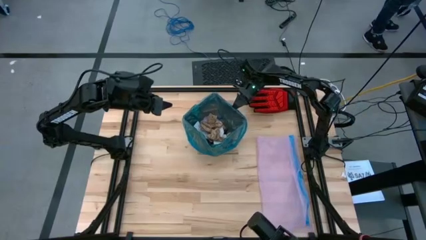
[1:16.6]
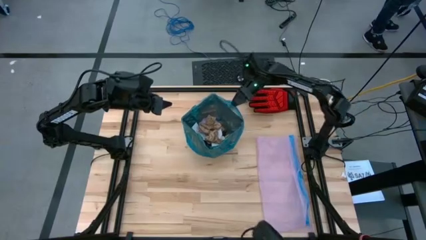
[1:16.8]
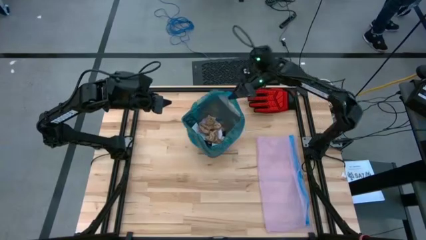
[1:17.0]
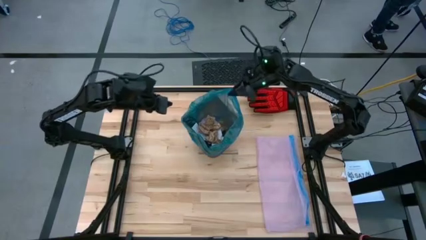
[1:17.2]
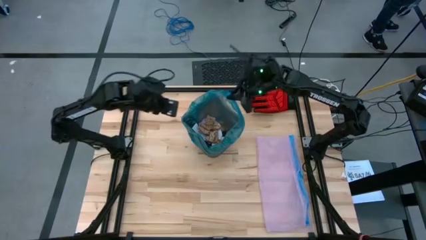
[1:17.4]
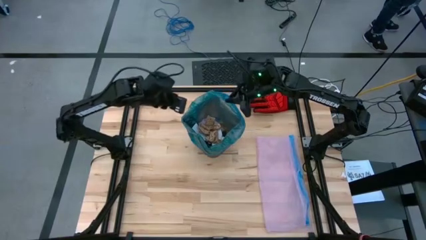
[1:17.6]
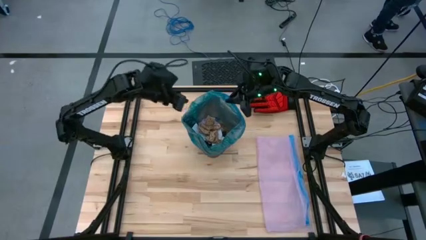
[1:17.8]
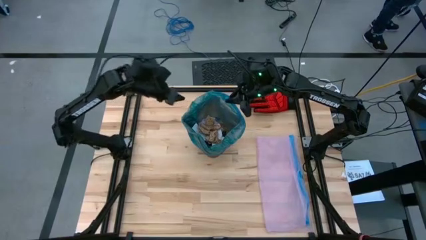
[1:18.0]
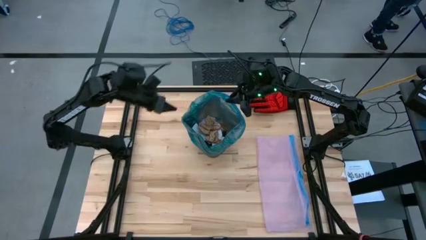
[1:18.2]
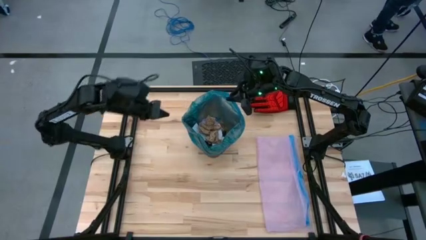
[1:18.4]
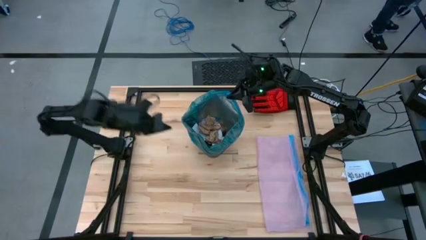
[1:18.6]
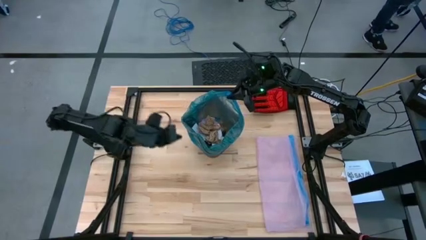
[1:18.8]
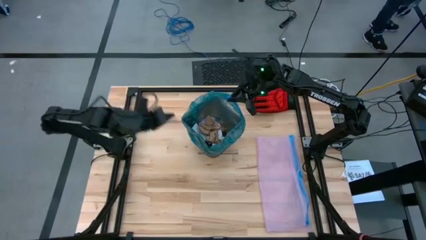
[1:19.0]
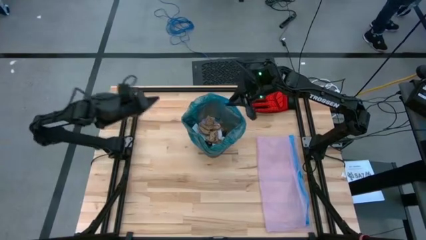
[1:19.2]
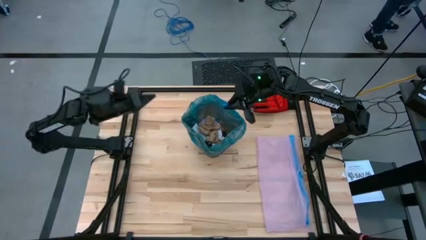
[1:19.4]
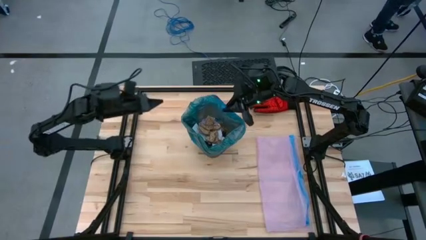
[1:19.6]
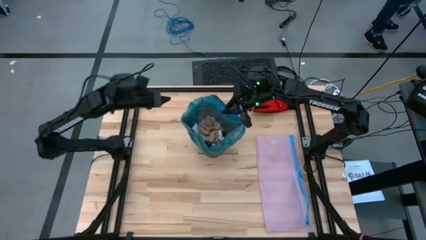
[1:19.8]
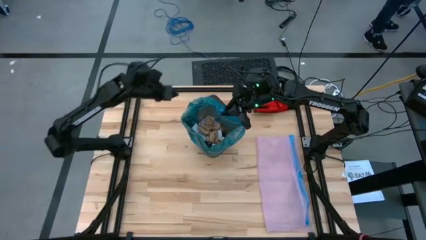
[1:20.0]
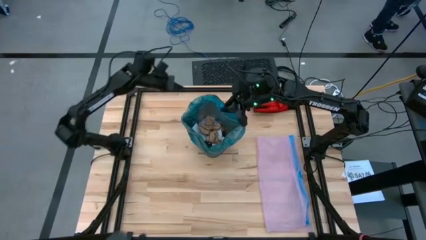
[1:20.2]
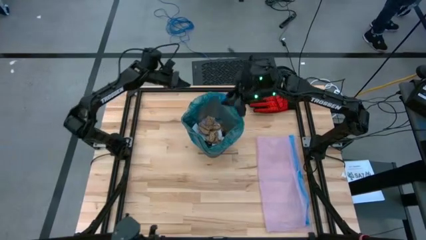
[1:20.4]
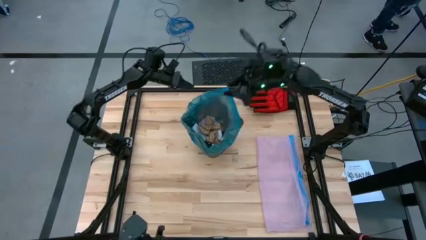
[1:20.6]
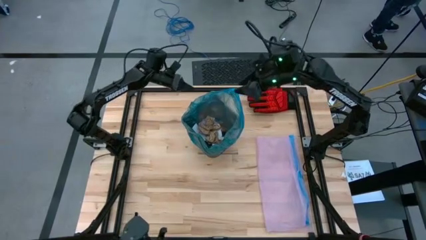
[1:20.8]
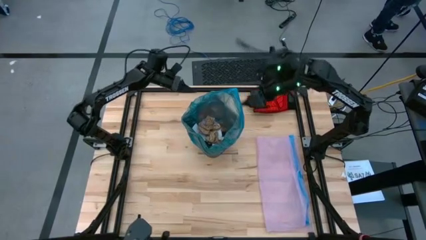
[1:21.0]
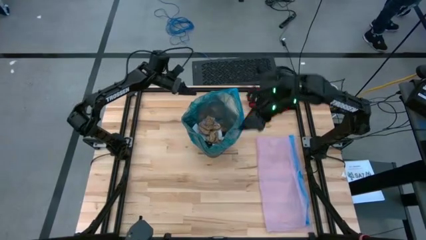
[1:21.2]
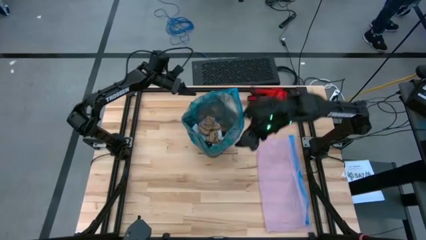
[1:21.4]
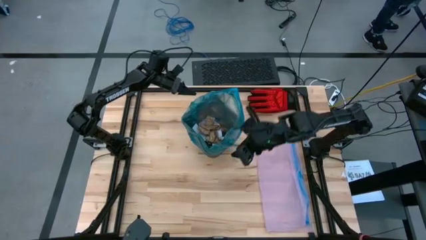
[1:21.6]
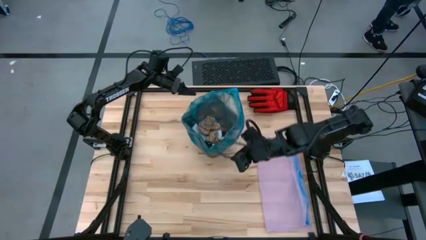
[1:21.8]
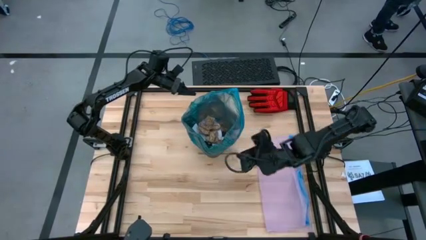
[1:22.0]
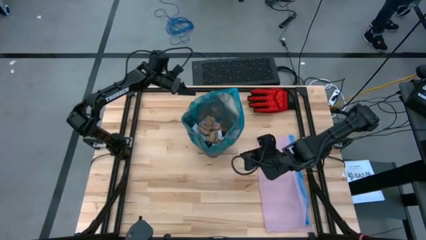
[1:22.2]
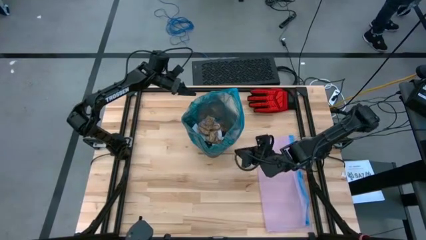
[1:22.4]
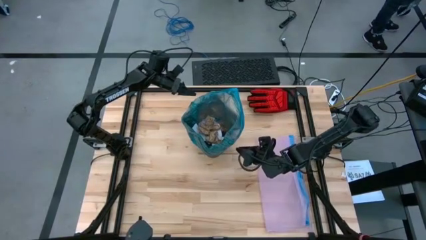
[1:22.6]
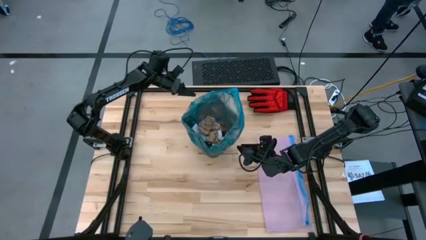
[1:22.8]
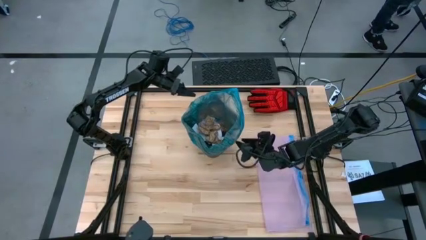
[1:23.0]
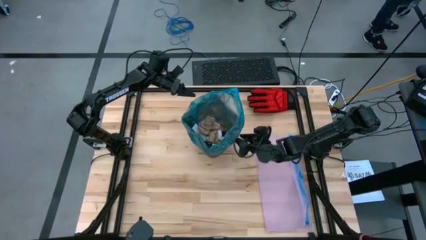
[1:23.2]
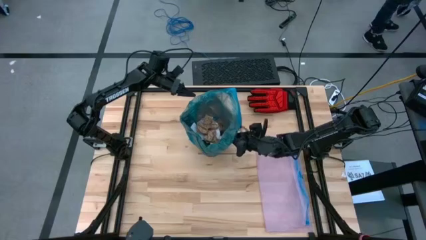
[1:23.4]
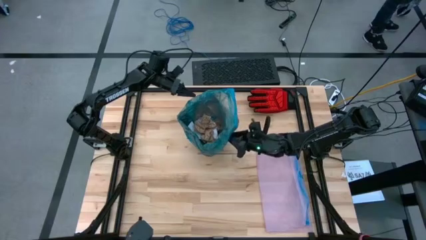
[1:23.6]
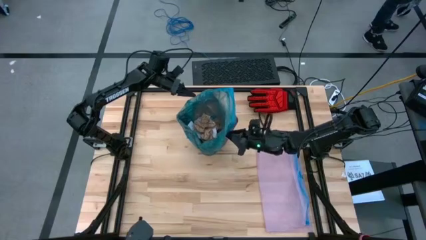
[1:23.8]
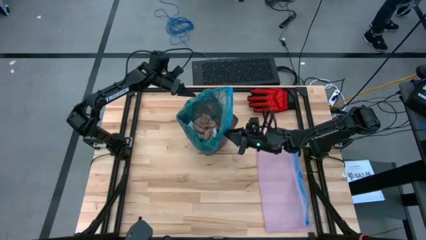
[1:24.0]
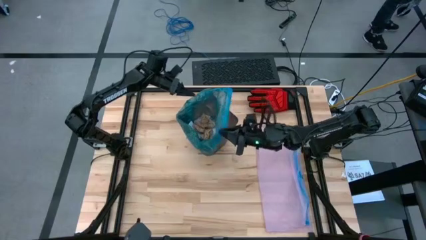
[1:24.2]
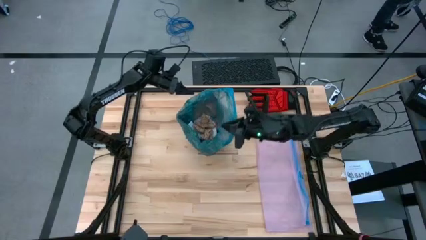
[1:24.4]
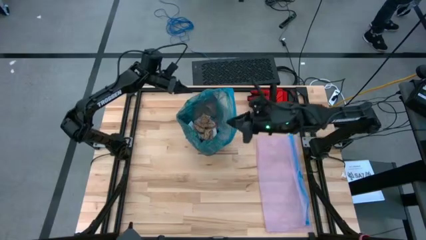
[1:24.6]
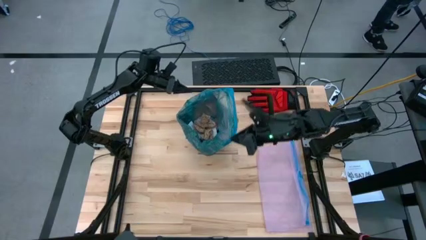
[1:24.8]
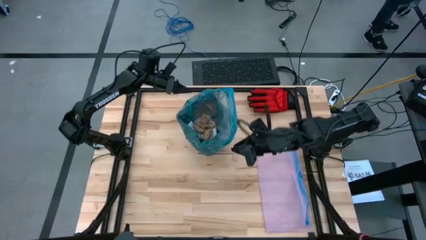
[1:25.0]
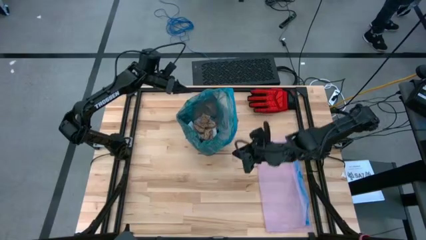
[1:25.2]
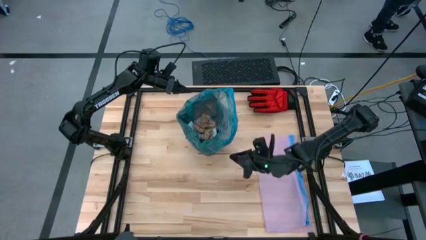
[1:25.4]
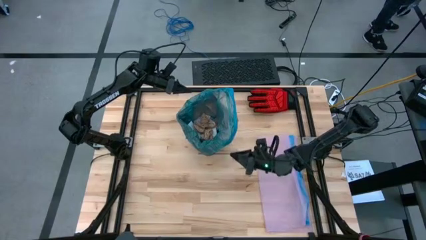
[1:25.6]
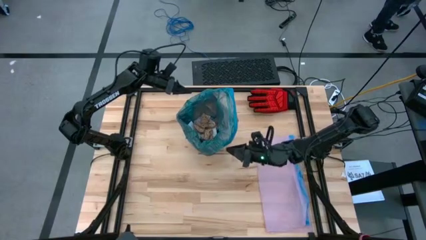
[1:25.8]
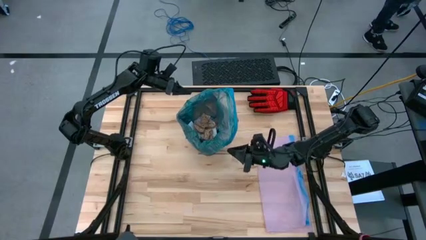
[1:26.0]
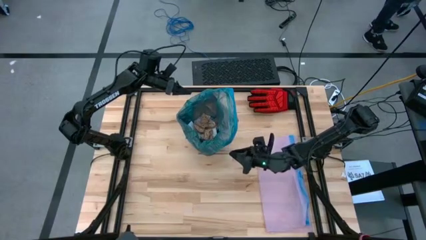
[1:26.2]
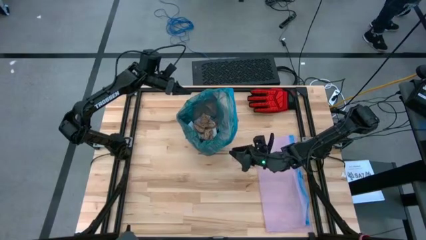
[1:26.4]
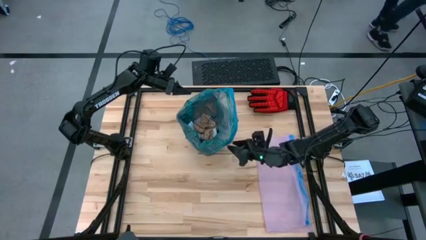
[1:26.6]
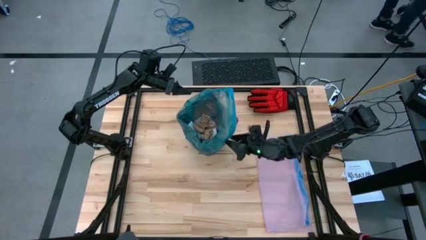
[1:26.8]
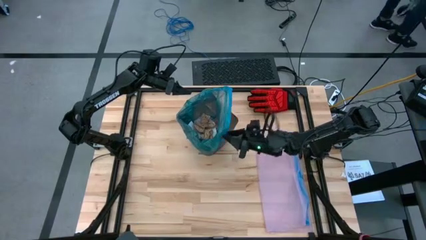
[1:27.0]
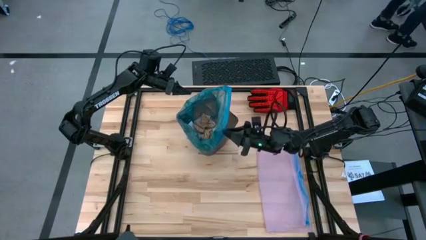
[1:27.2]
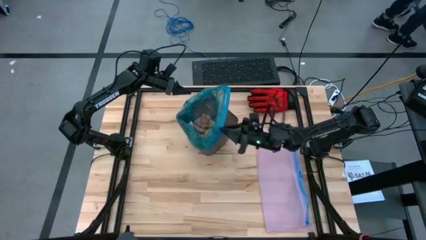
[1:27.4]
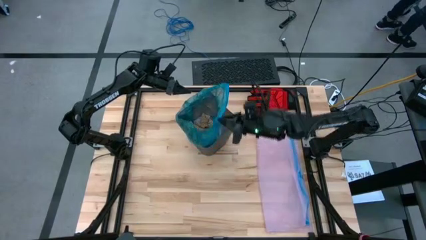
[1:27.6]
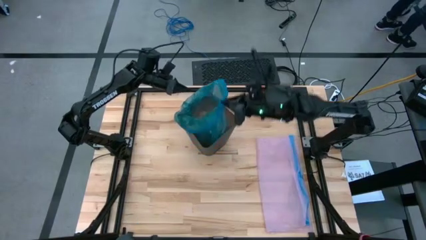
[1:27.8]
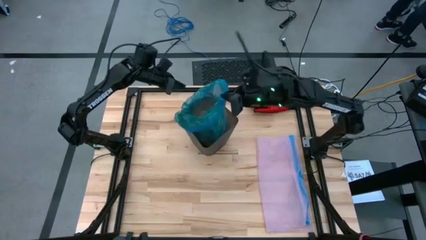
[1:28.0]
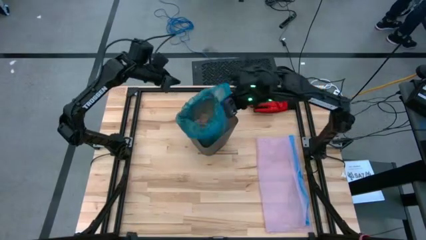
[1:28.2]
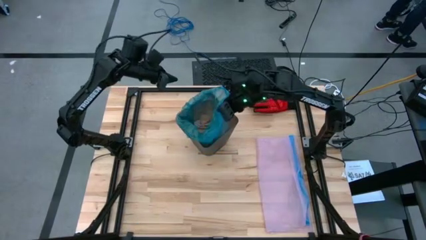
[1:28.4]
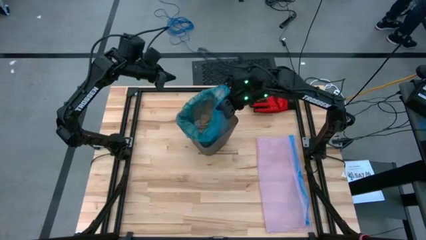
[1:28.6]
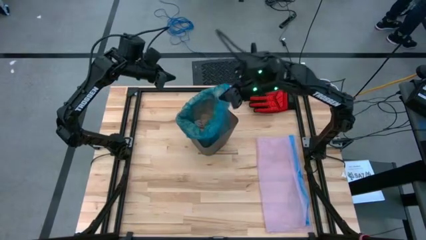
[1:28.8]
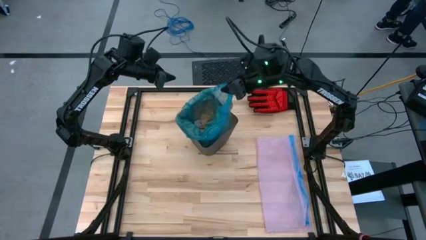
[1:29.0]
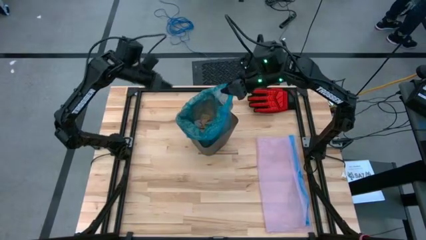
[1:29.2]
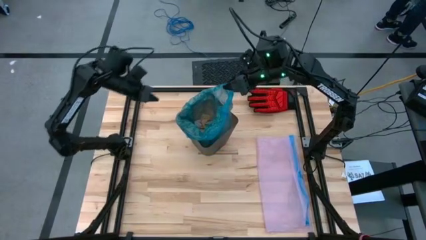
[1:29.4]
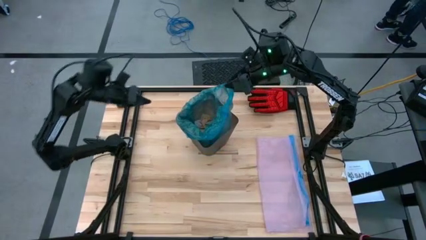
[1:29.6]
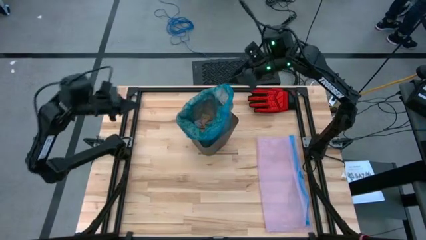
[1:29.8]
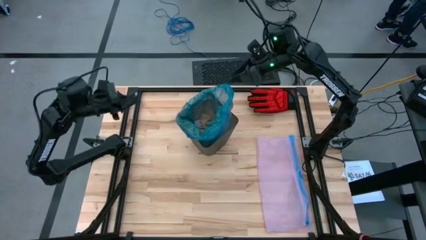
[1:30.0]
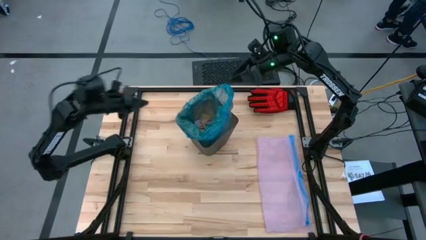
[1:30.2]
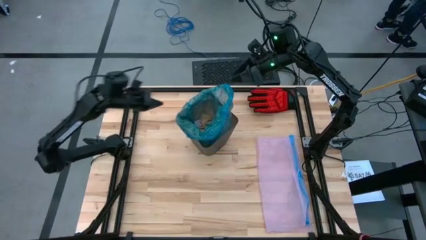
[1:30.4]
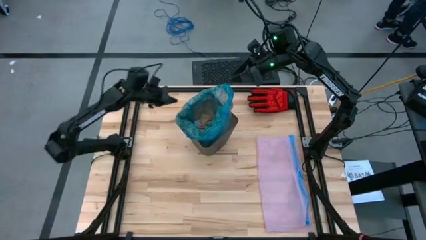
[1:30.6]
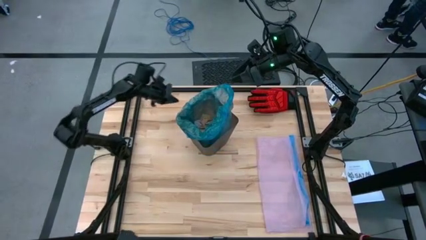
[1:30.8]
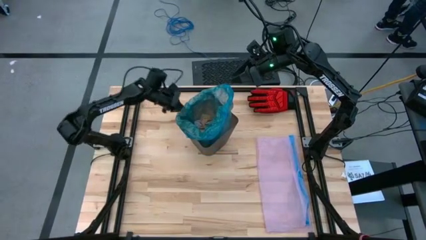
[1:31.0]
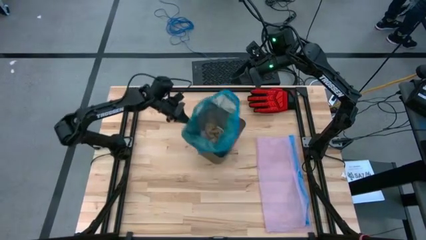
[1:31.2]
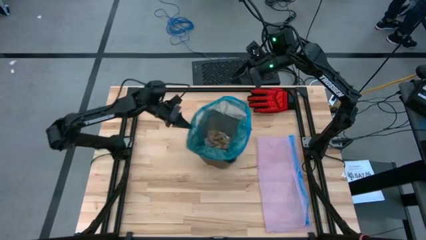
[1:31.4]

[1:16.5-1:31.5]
Task: place trash/remove bag and relplace
Remove the blue trash bag from the trash bin

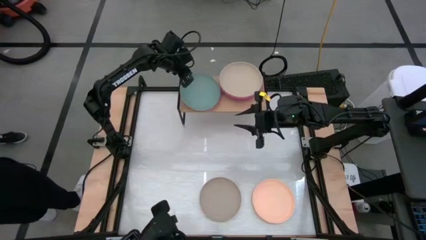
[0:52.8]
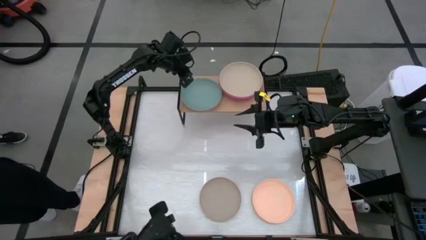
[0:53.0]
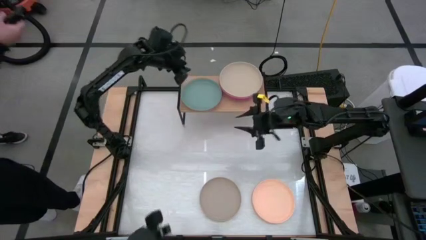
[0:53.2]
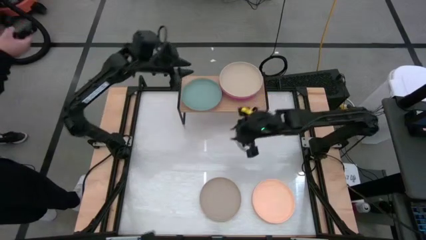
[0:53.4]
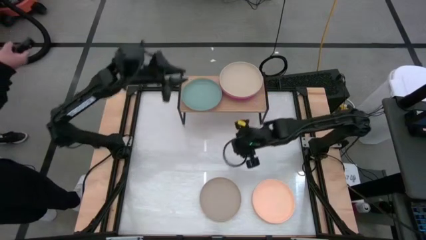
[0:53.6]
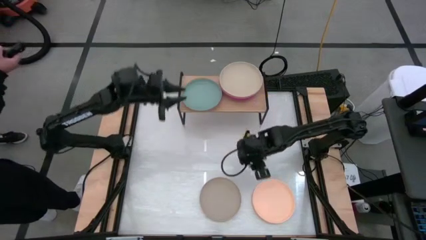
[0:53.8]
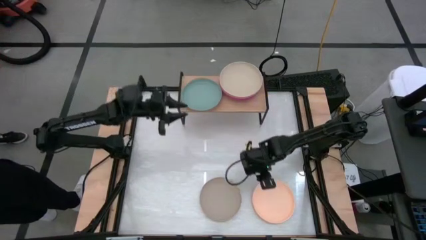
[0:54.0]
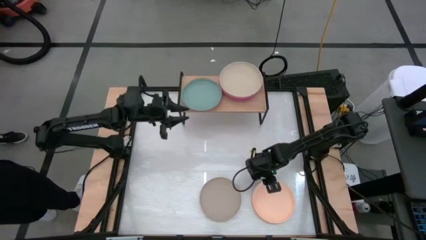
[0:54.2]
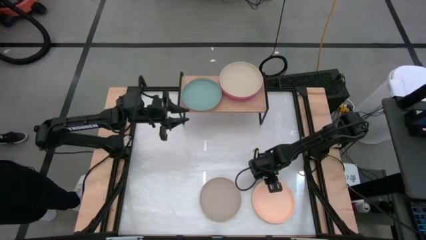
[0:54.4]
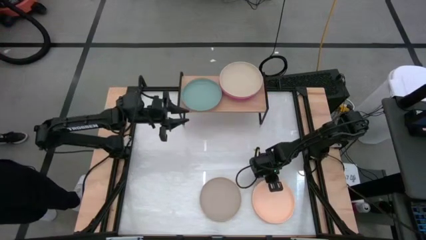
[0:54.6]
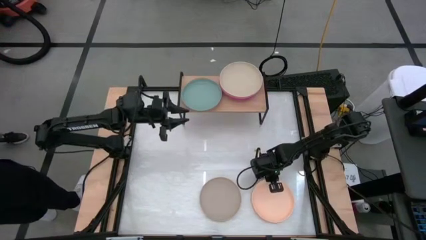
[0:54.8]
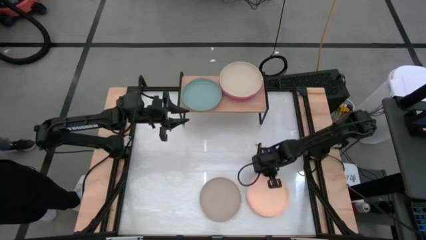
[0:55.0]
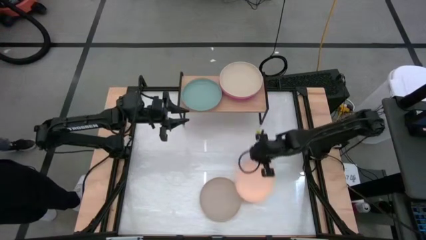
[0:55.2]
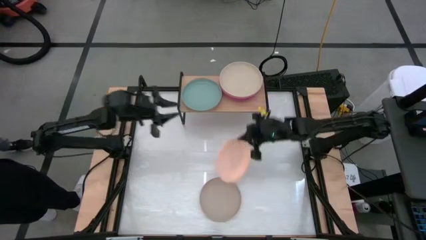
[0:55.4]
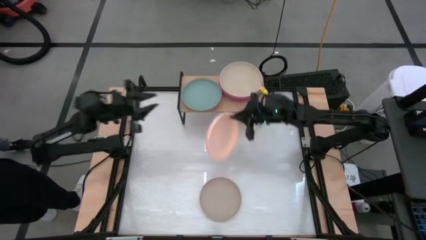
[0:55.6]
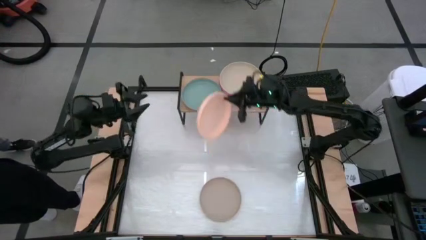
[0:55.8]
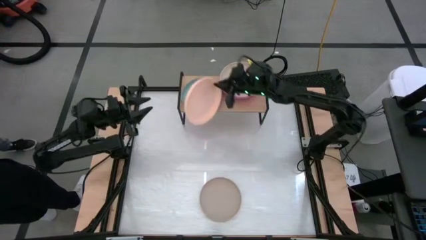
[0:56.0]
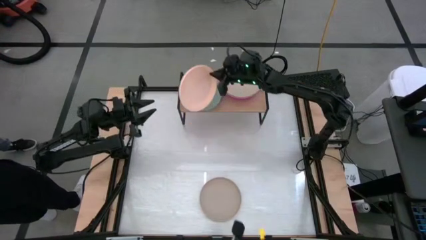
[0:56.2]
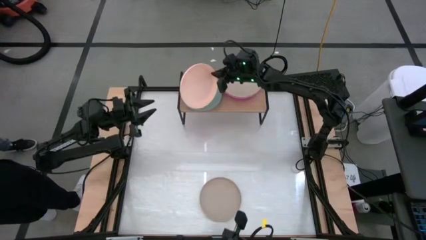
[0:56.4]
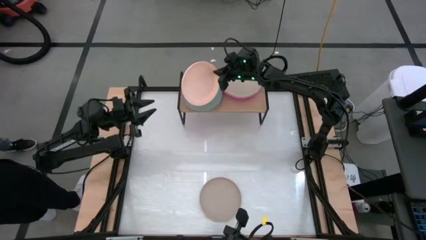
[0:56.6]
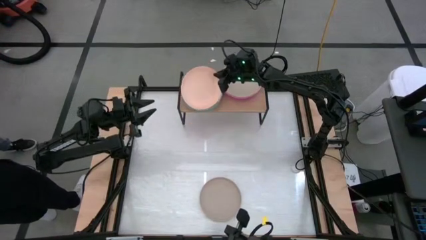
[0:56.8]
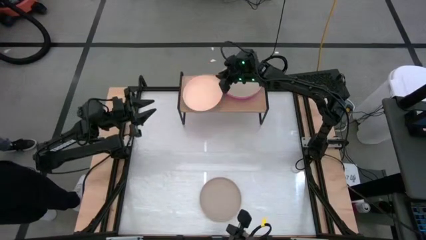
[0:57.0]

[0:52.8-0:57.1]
Task: Place and stack plates onto a shelf
Stack the light yellow plate on top of the green plate on the shelf
